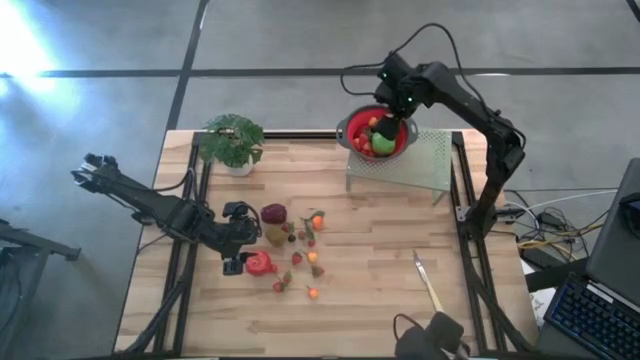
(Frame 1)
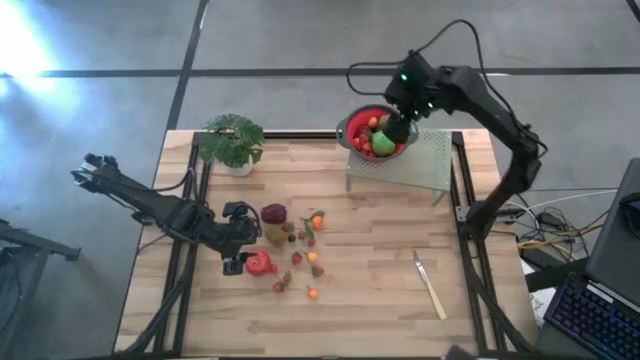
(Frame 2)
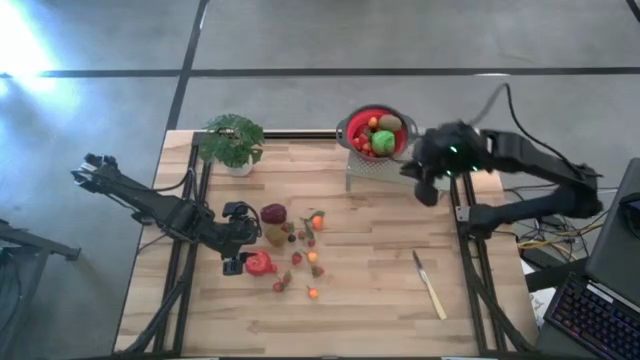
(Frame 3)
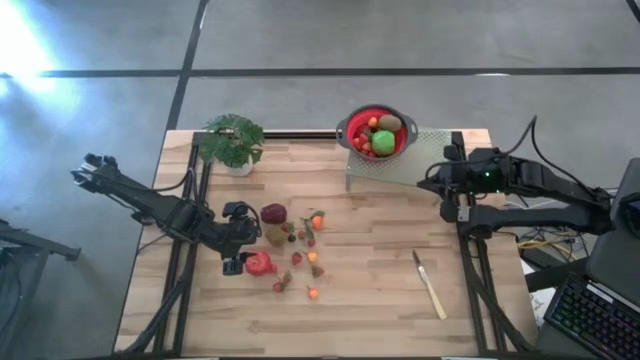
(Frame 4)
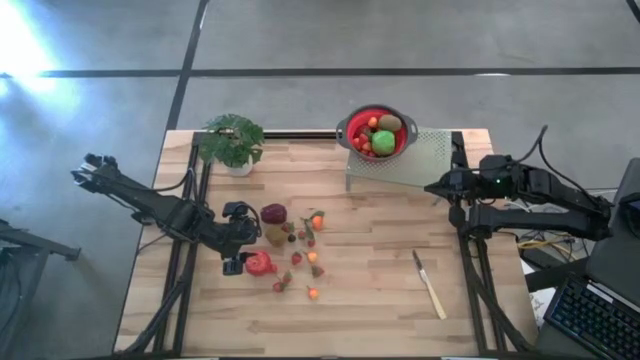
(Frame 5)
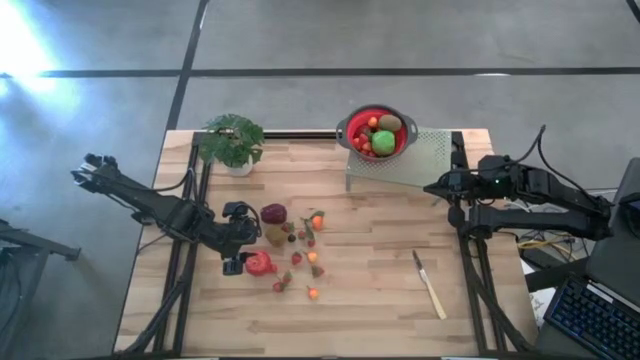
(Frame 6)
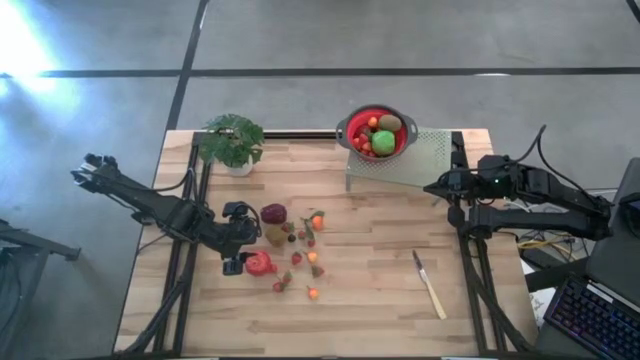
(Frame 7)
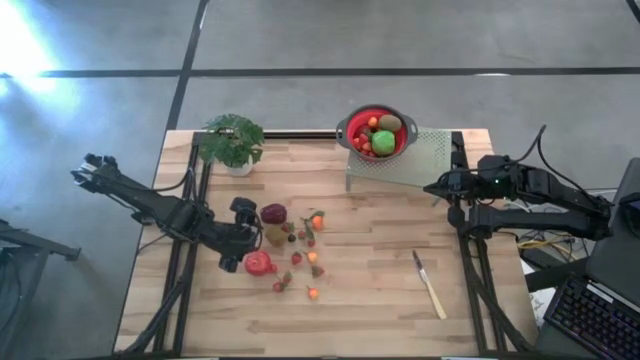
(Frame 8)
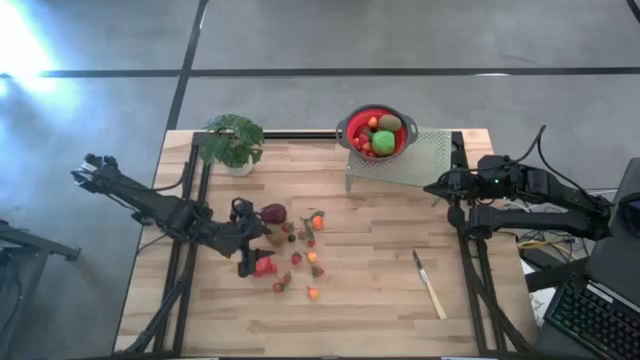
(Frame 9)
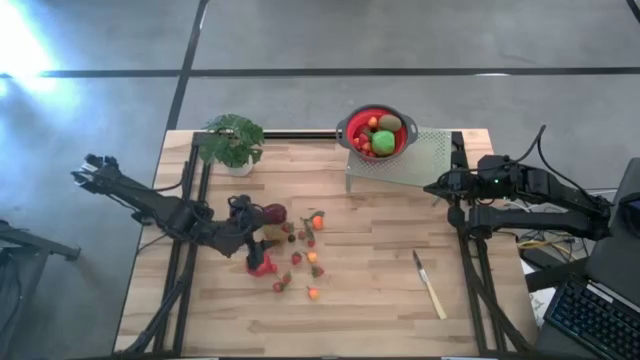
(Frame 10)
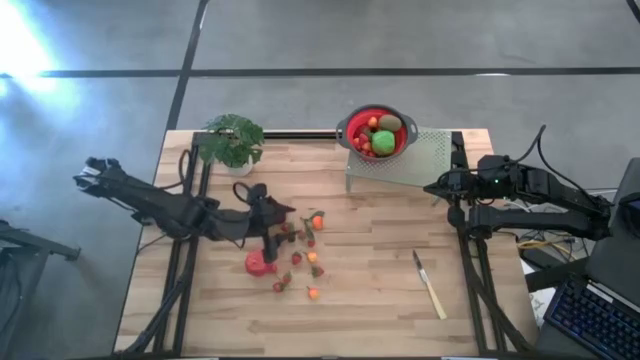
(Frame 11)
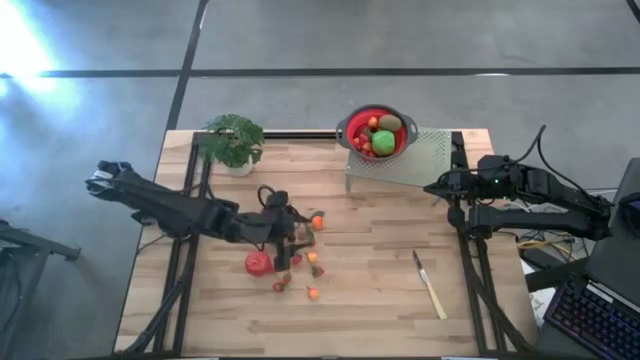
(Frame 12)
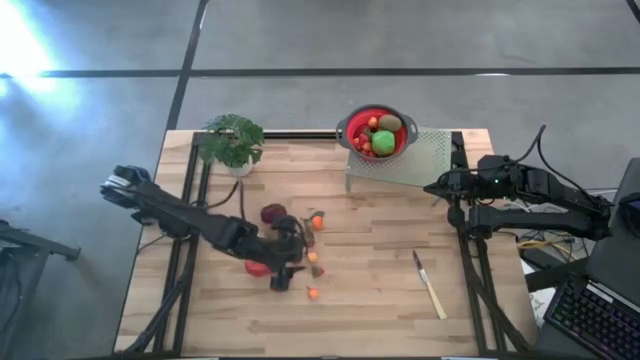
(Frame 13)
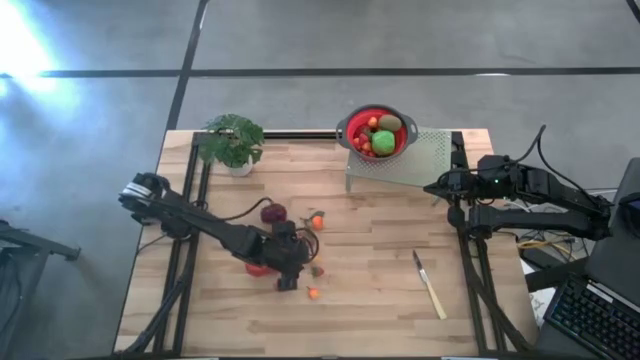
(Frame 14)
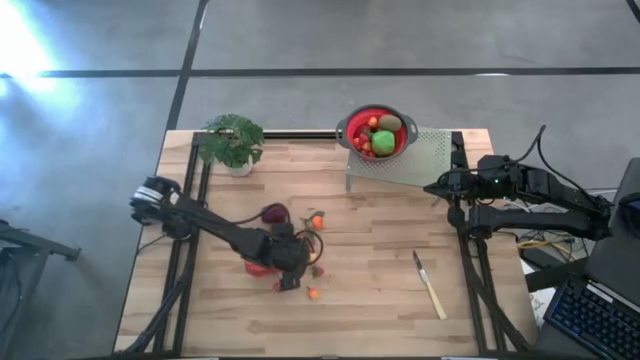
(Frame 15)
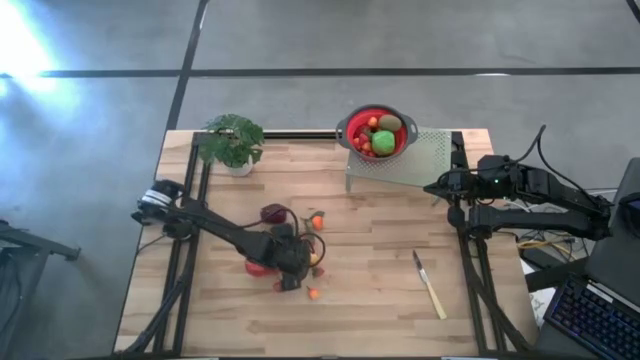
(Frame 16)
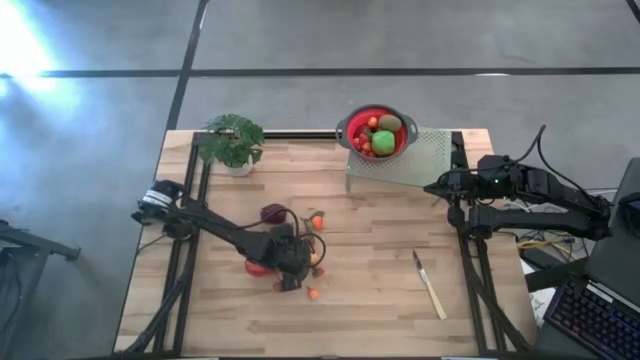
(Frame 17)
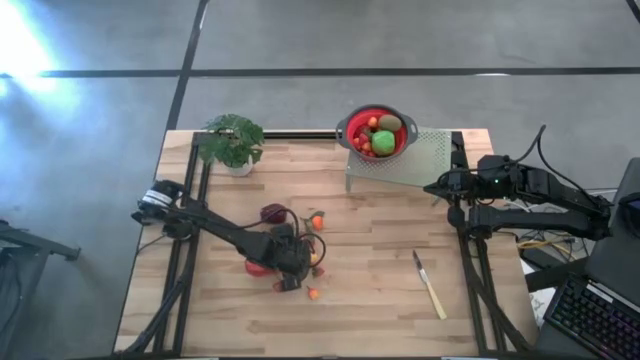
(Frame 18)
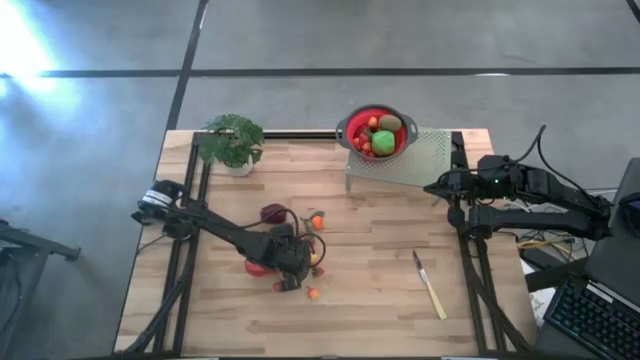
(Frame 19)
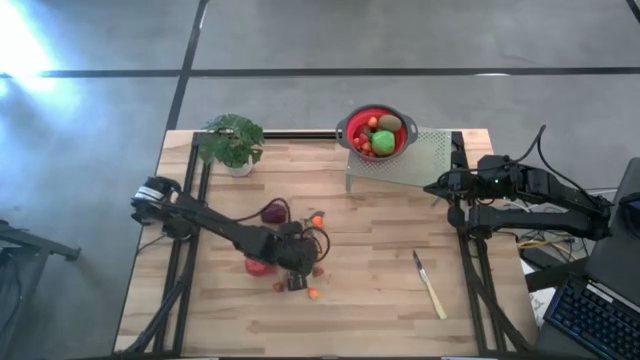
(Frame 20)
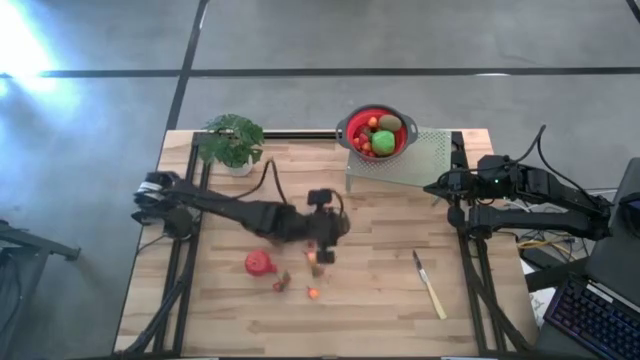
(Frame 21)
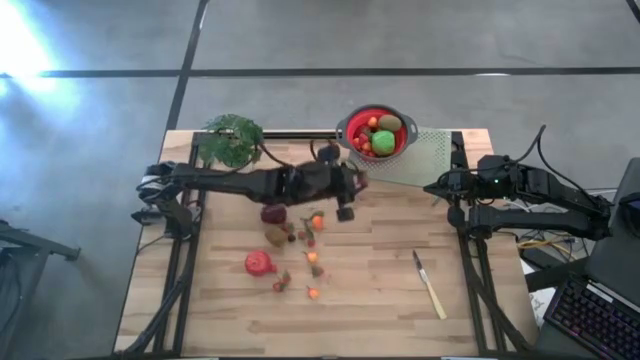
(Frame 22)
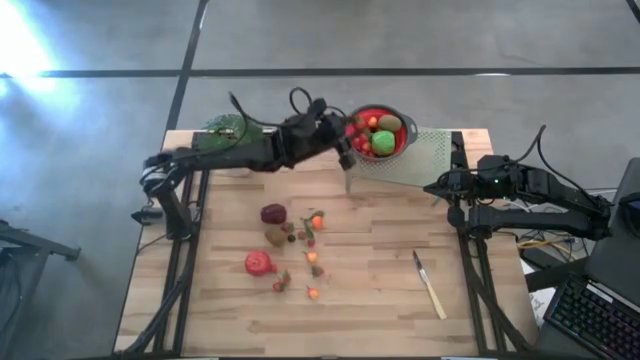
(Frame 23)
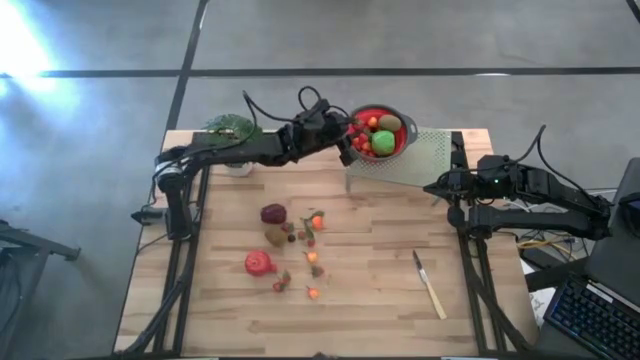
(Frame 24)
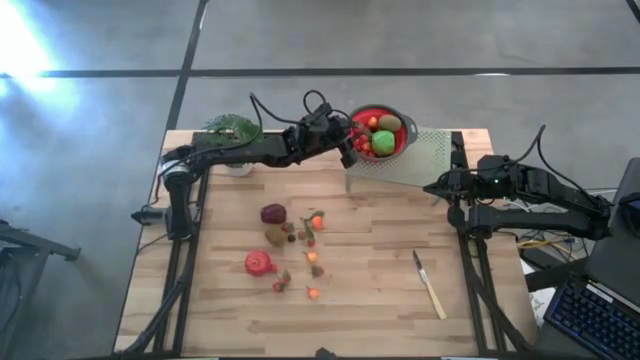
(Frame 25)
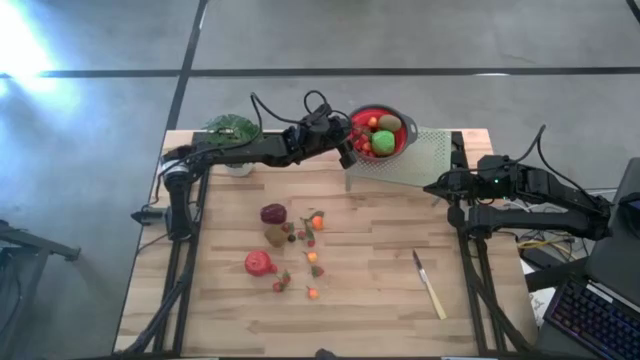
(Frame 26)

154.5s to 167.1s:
Task: Pick & Place Fruit
Put the strawberry into the strainer bowl on the shelf

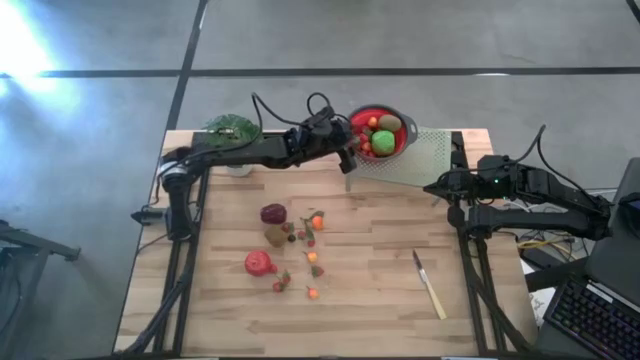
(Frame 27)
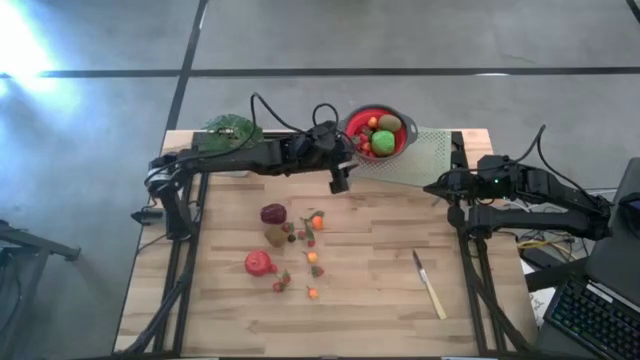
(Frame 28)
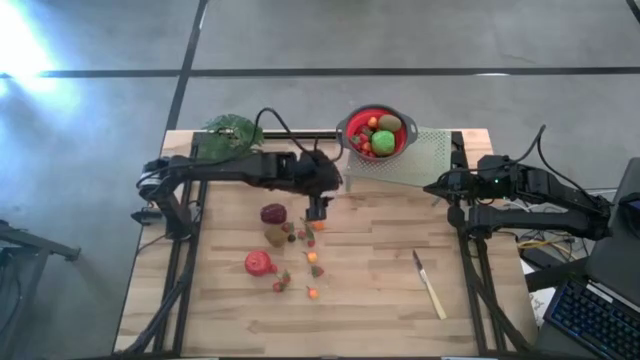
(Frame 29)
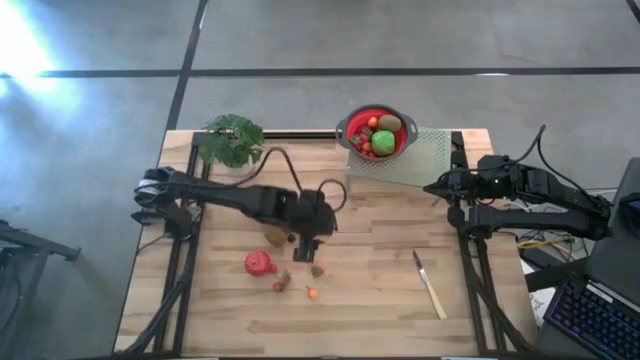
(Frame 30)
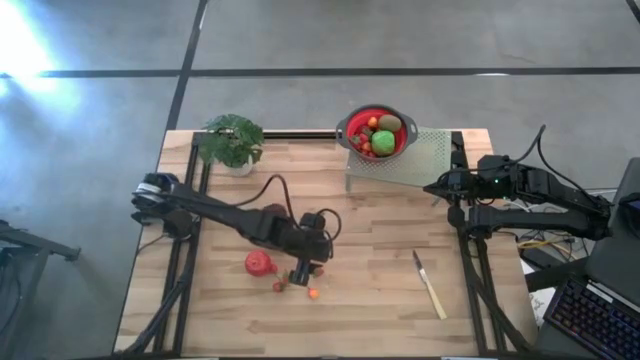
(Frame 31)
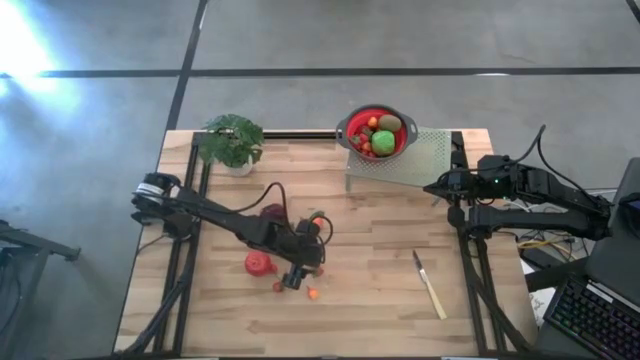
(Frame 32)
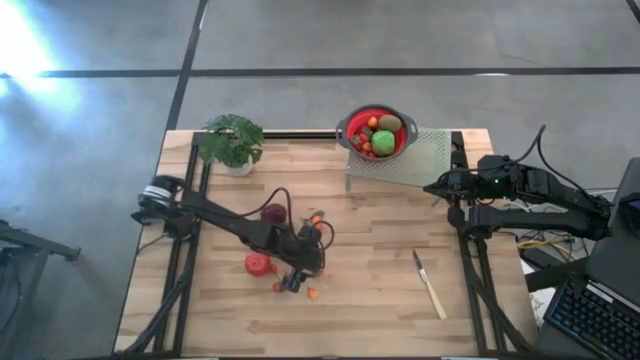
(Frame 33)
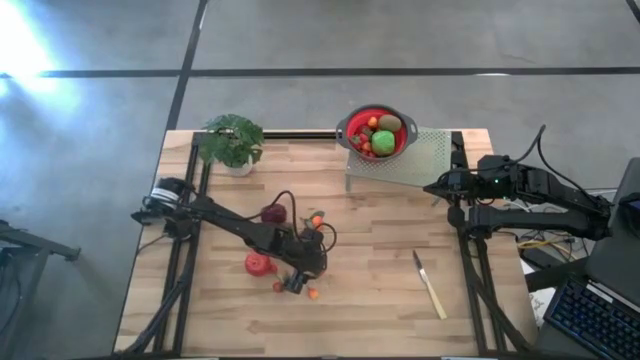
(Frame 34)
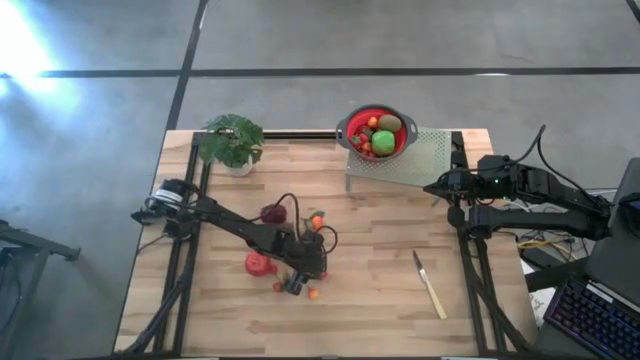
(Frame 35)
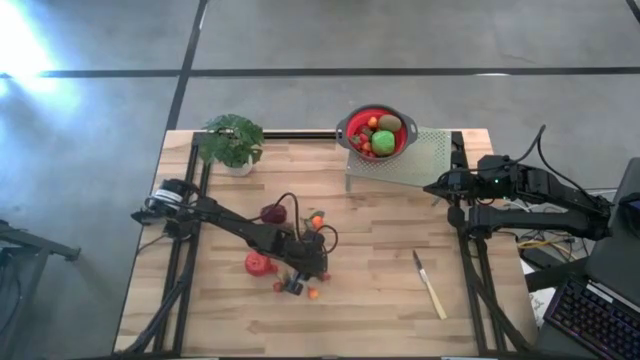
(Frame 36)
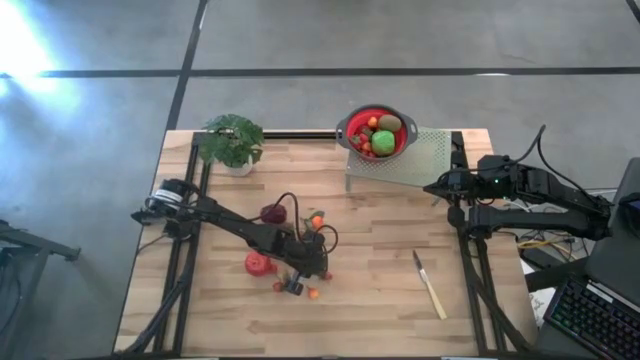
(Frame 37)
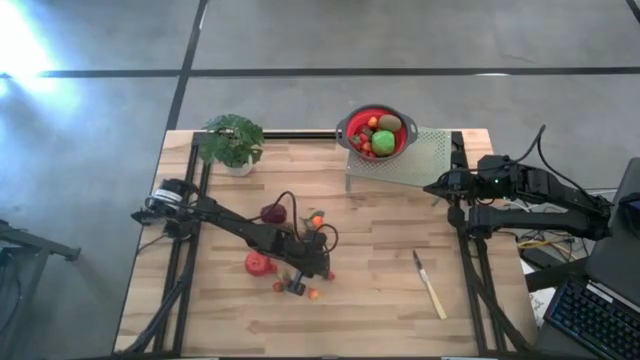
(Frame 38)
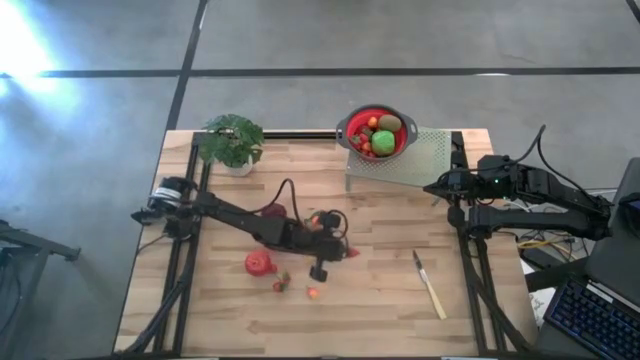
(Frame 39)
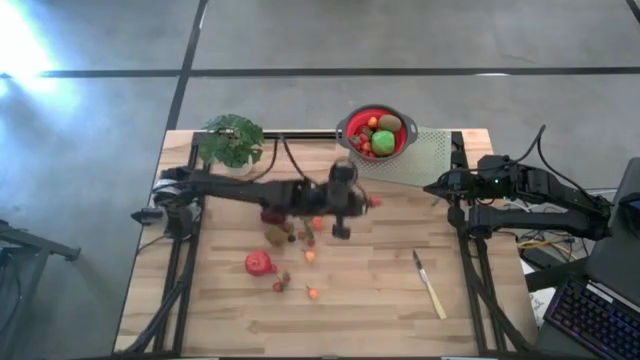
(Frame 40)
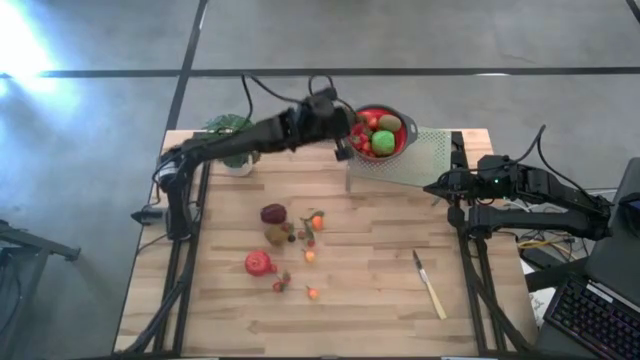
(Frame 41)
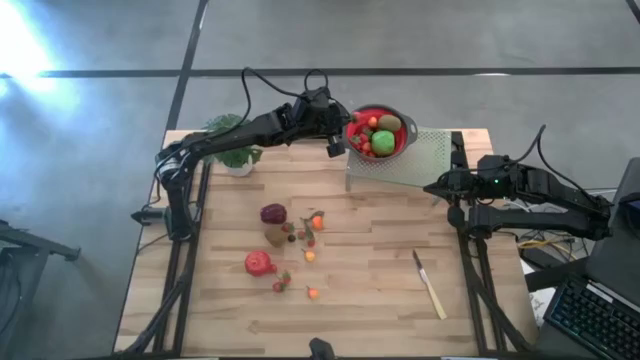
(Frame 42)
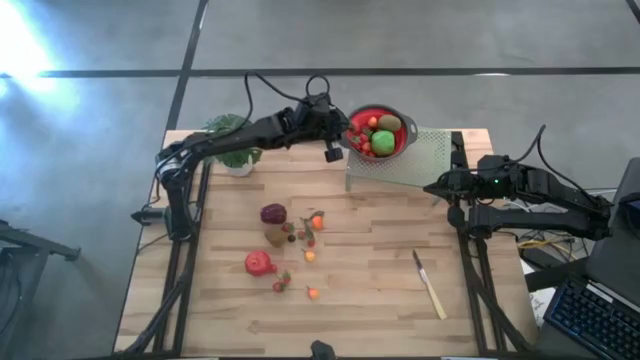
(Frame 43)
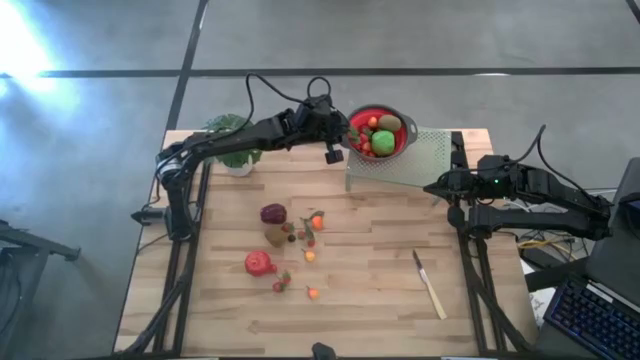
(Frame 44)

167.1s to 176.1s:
Put the strawberry into the strainer bowl on the shelf
